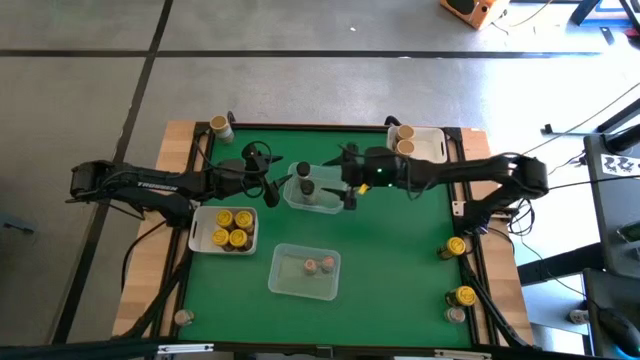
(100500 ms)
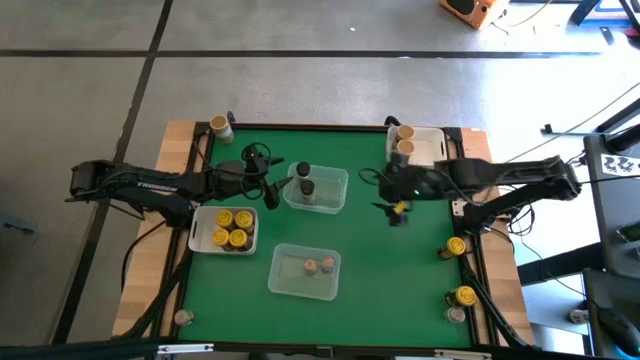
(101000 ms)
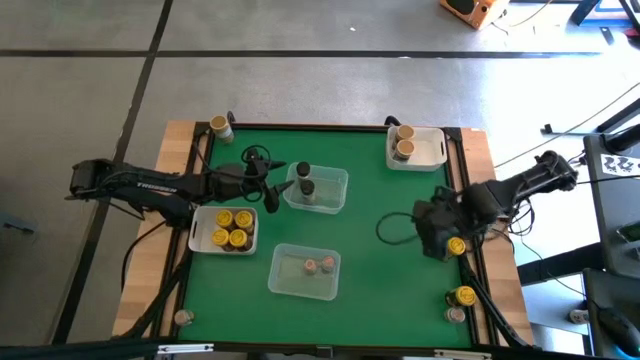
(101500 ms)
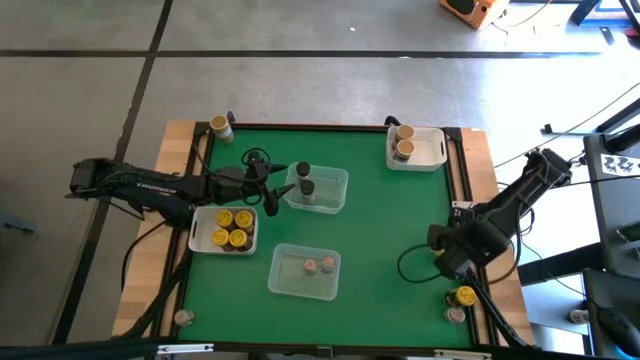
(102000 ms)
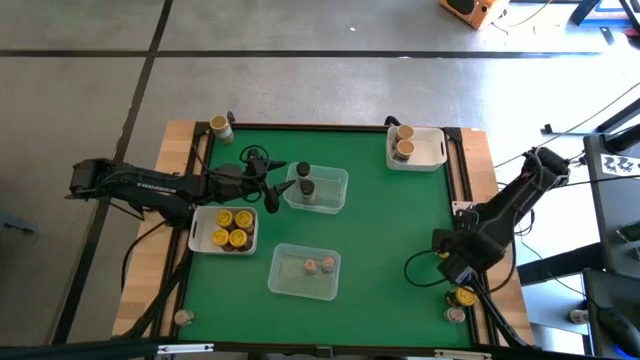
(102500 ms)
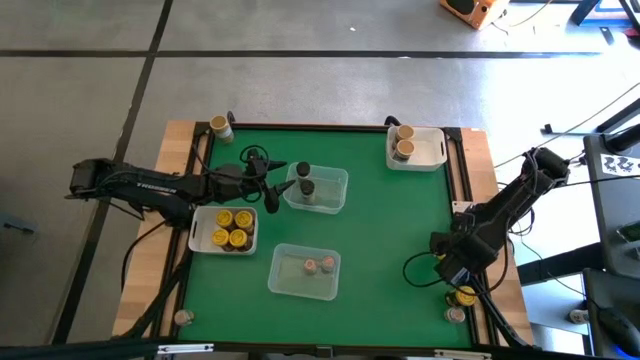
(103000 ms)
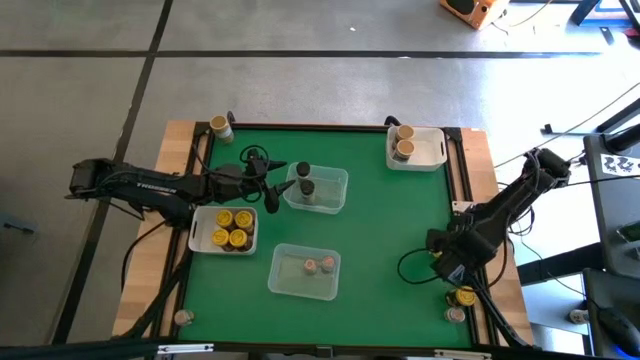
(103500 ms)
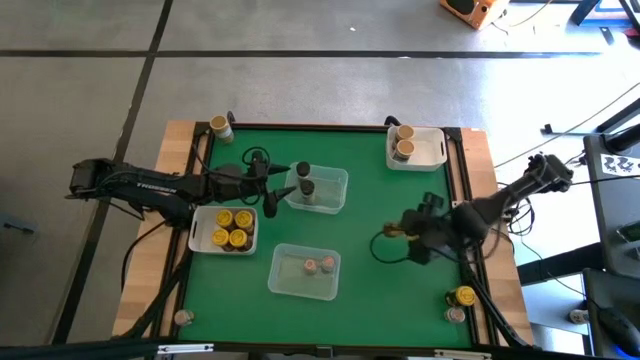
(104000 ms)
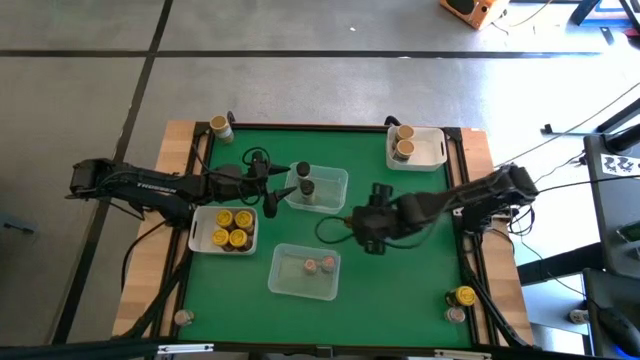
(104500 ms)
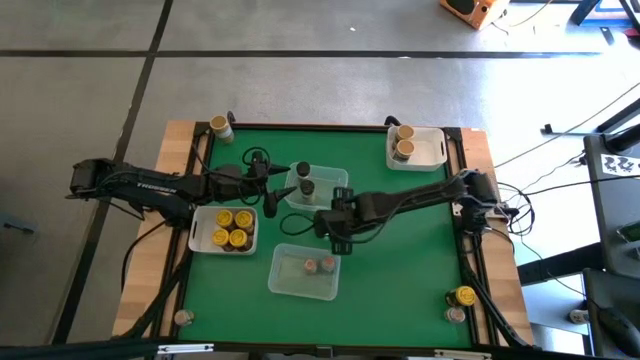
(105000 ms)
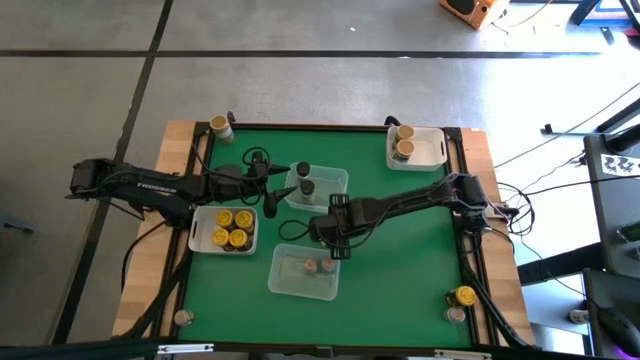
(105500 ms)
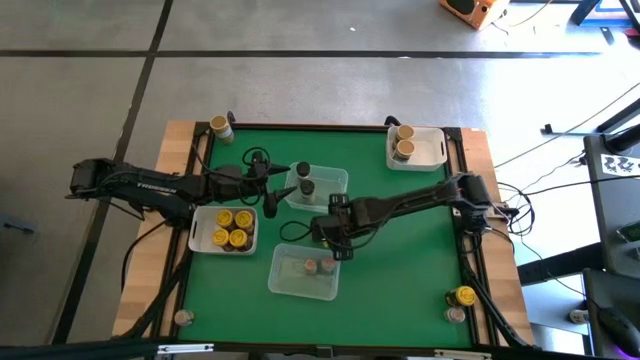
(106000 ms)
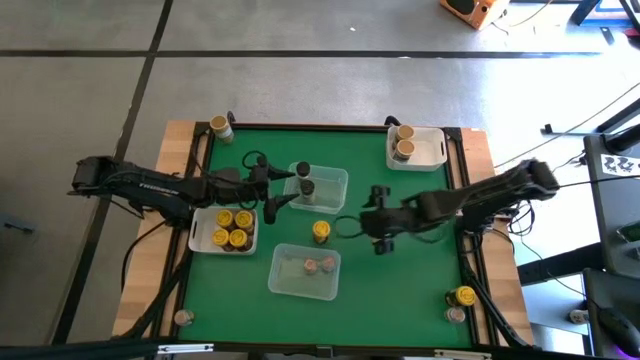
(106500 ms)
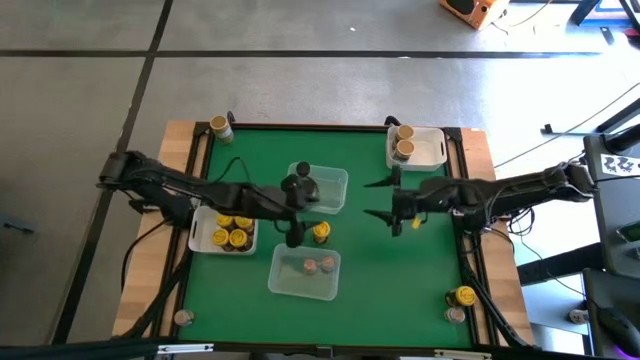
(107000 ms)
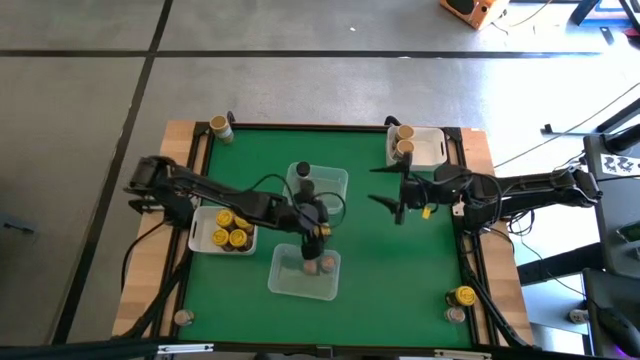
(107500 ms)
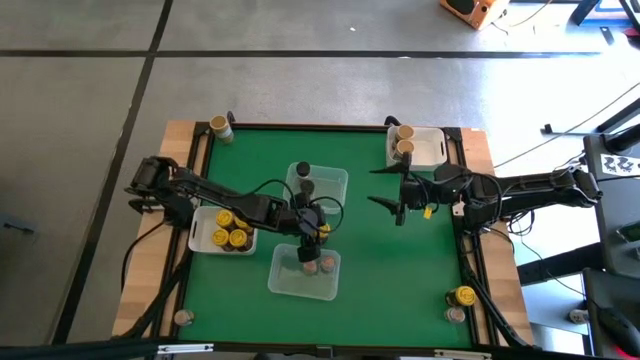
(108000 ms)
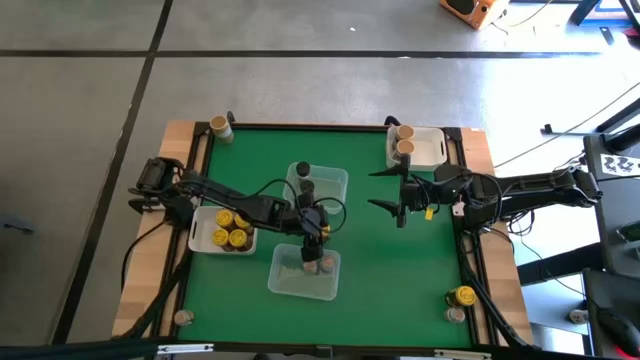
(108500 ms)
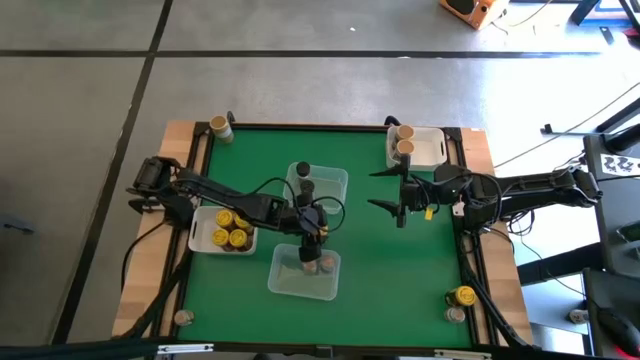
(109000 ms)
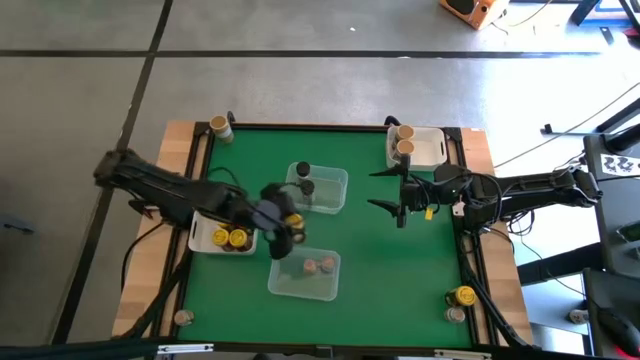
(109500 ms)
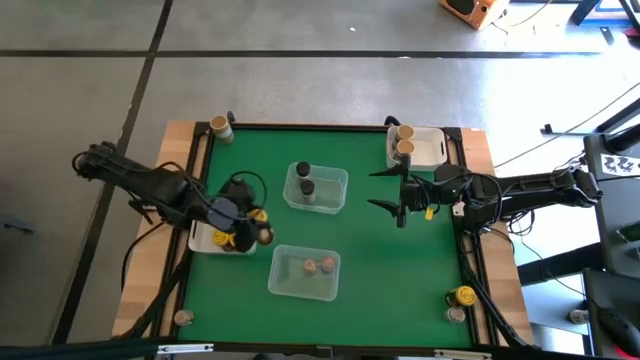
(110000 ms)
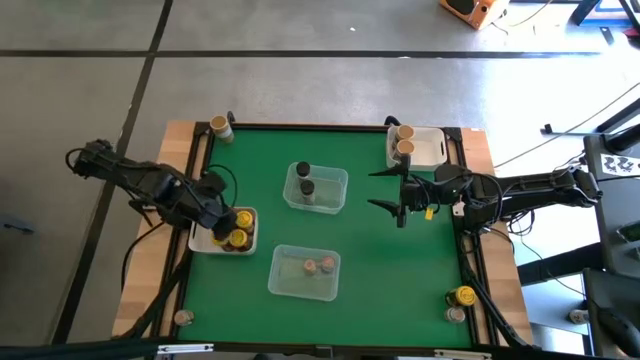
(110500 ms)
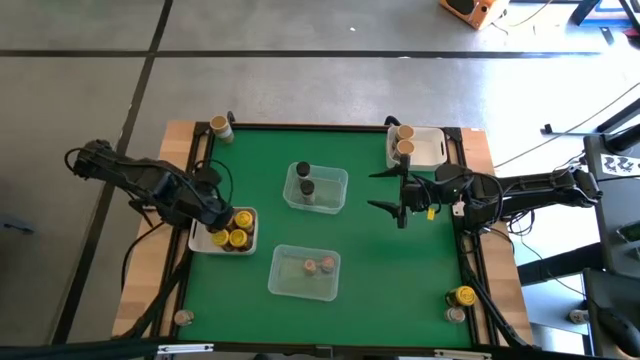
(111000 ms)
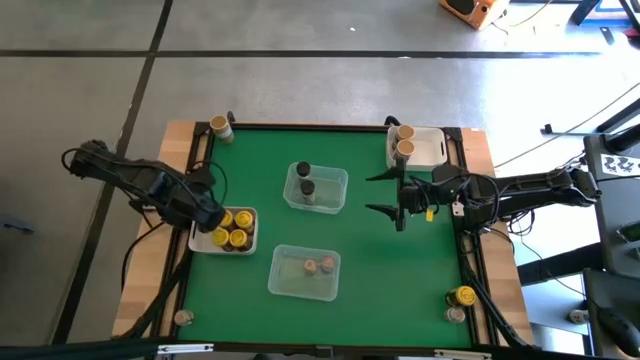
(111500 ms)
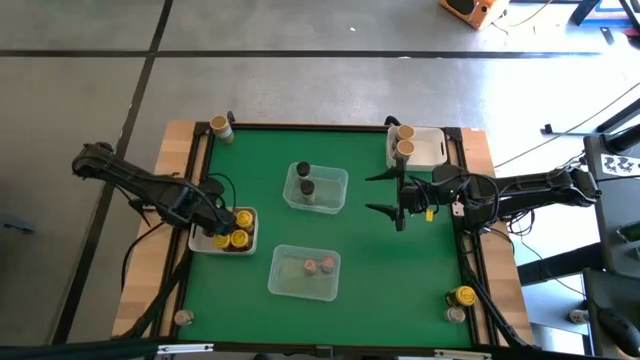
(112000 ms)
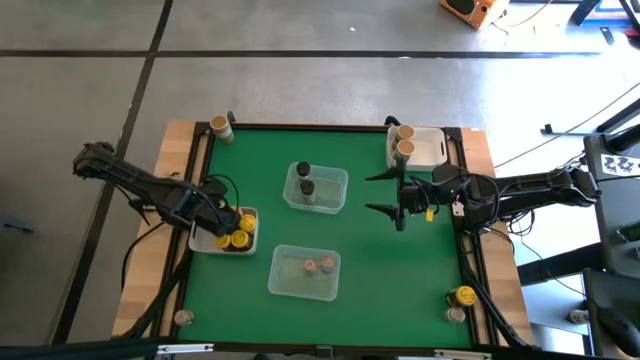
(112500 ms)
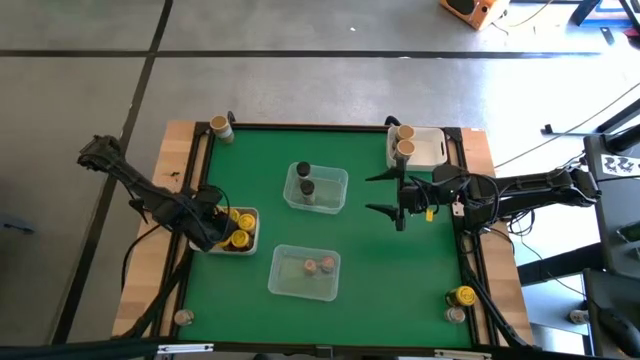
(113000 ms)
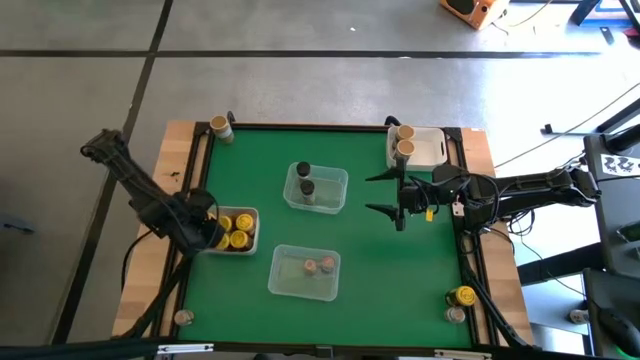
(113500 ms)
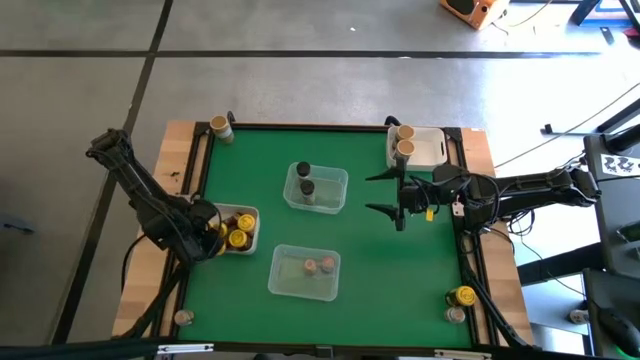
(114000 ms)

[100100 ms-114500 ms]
Task: Sort spices by type
Put the yellow spice can into the bottom white bin

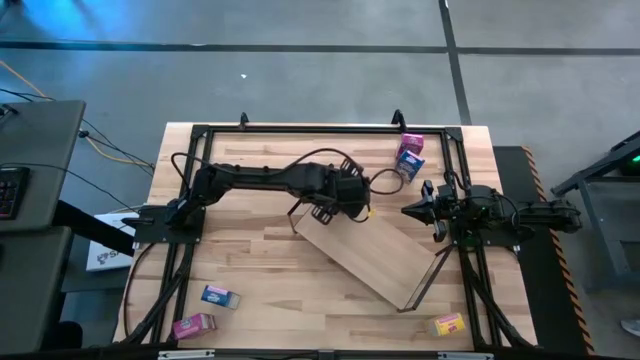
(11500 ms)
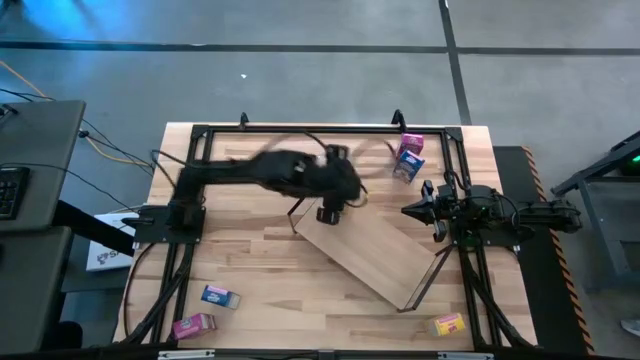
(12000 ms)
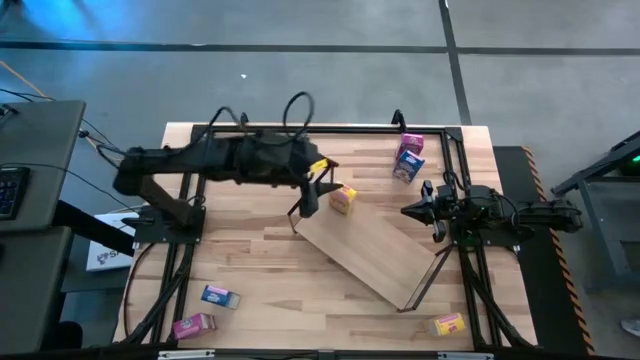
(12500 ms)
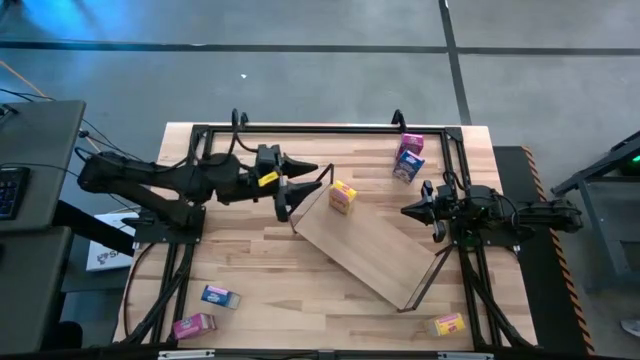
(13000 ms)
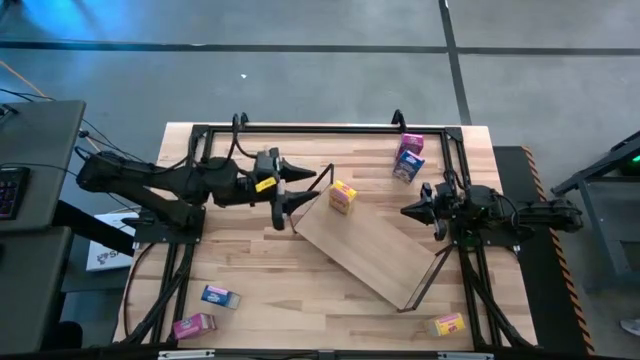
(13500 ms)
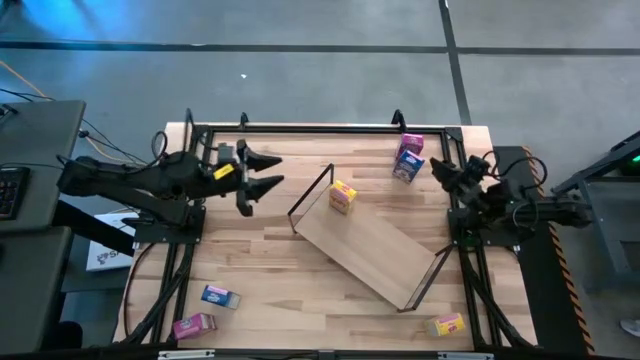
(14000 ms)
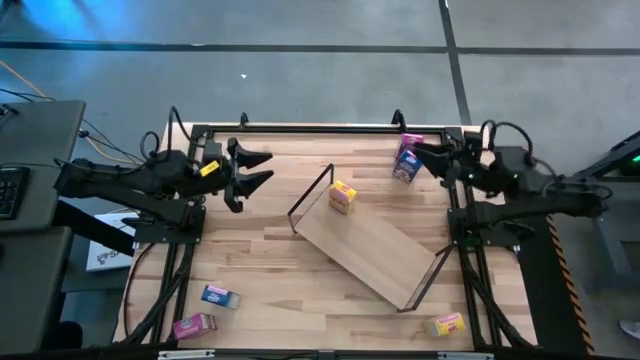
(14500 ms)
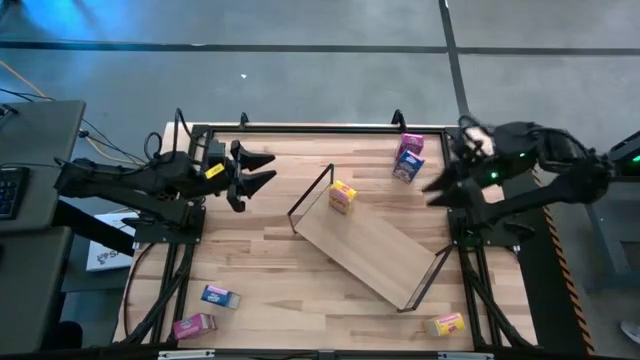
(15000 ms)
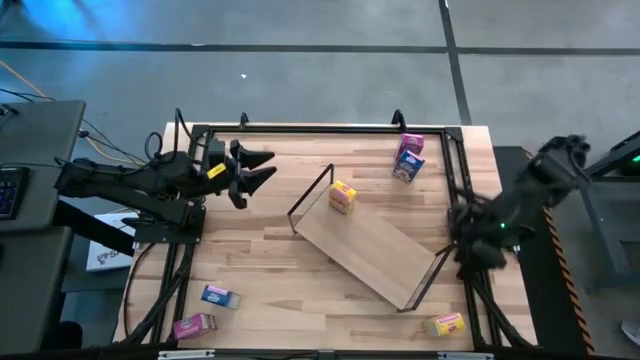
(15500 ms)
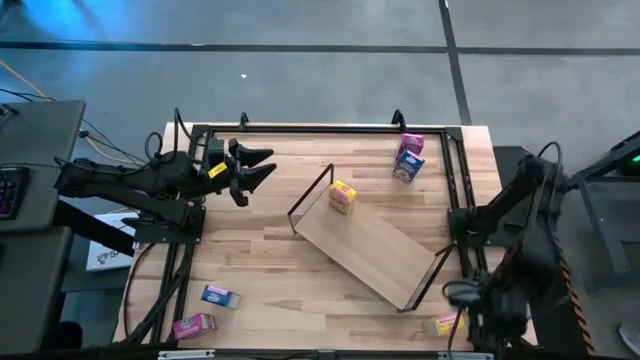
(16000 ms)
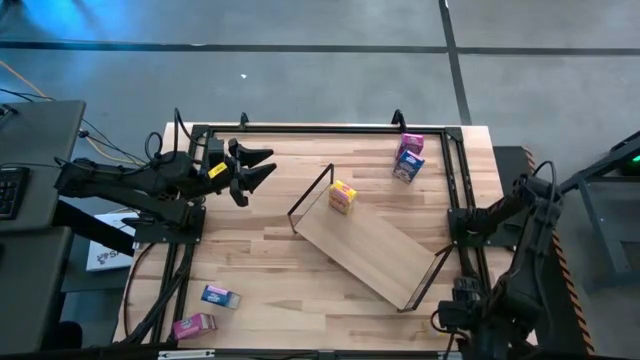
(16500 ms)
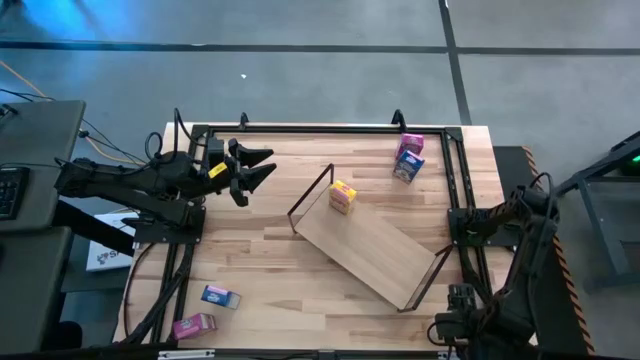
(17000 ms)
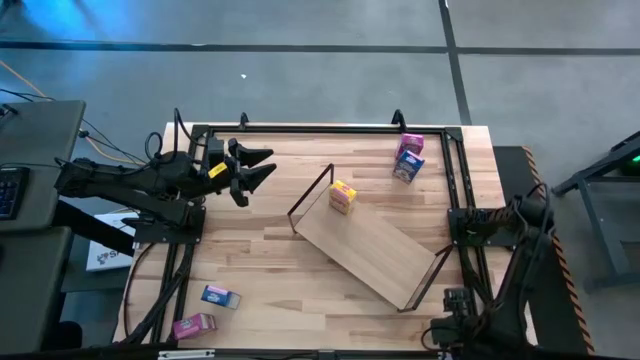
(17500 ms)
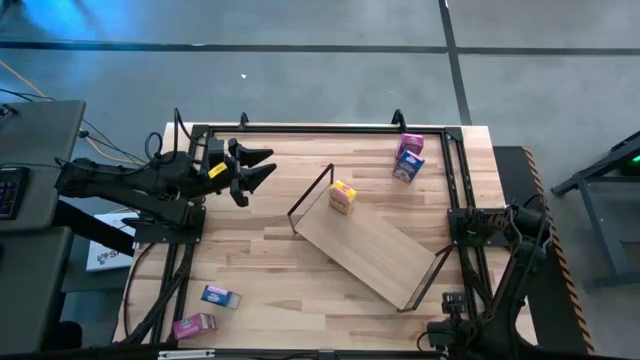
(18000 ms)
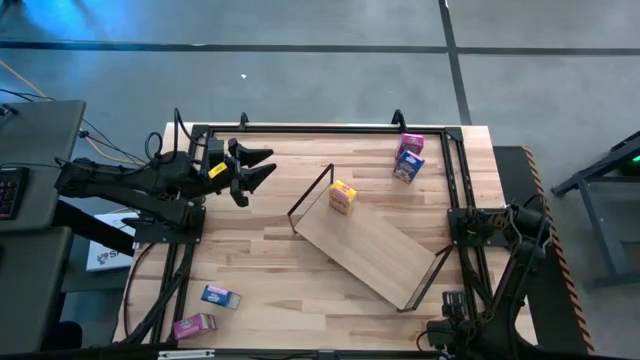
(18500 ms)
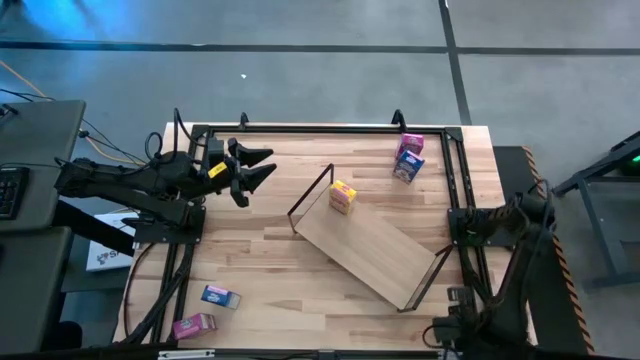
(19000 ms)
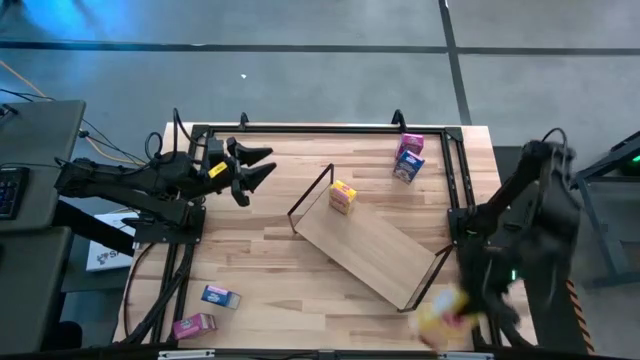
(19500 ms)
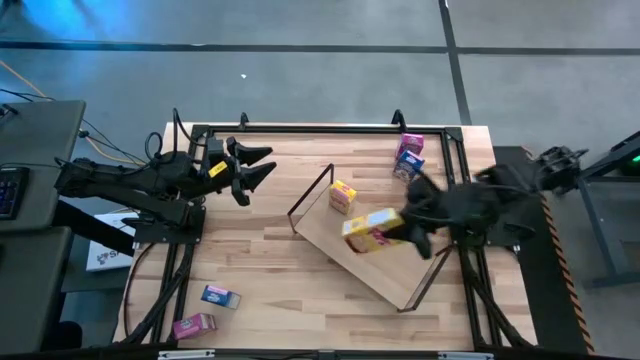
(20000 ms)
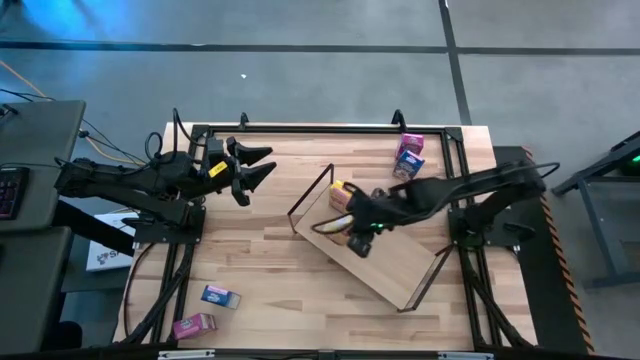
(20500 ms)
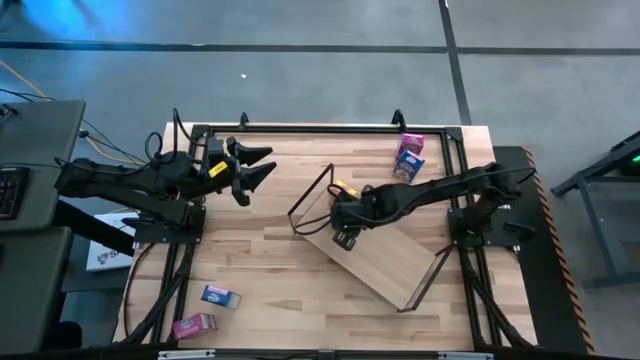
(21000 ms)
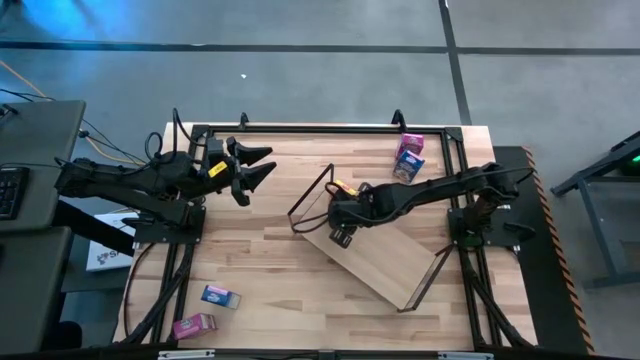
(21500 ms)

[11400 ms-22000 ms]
Task: Stack cereal on shelf
Put the bottom yellow cereal box on the shelf
